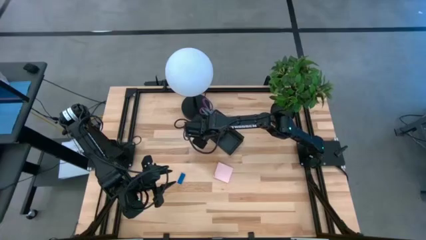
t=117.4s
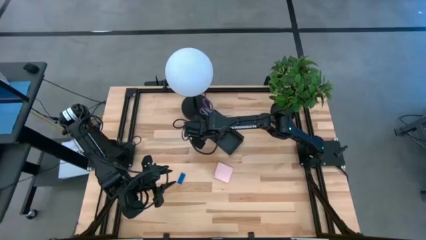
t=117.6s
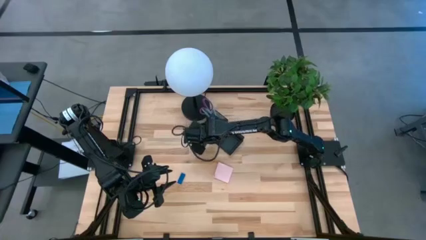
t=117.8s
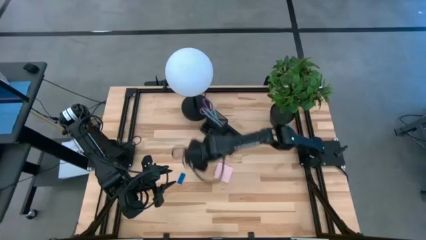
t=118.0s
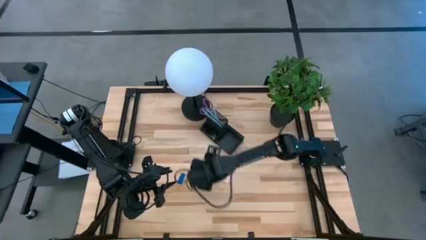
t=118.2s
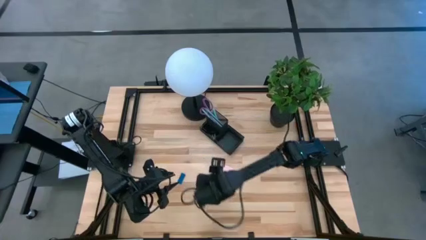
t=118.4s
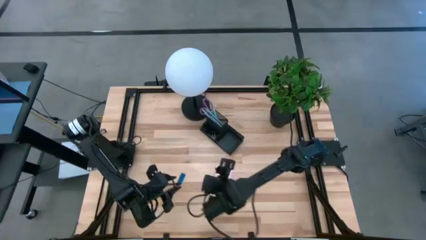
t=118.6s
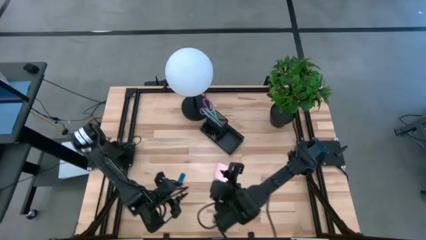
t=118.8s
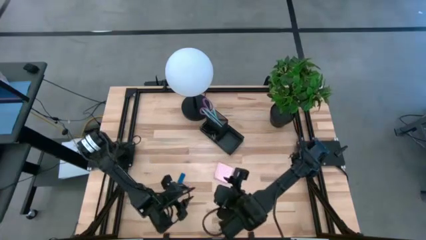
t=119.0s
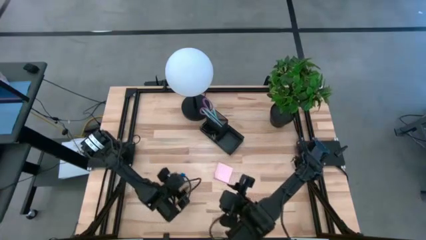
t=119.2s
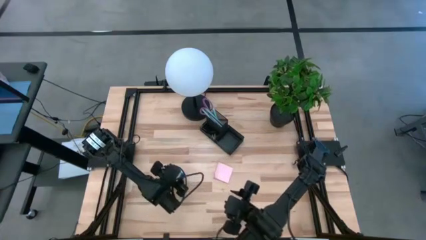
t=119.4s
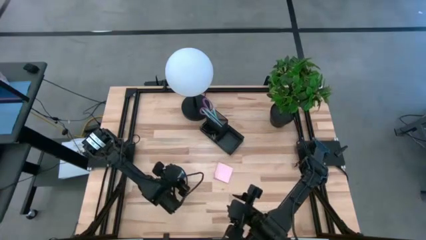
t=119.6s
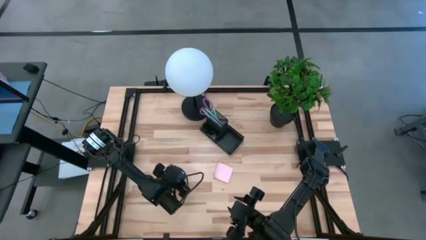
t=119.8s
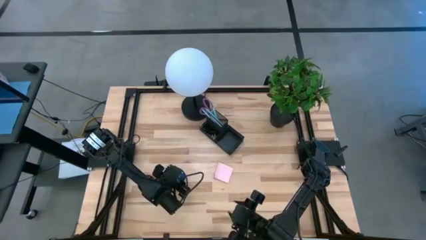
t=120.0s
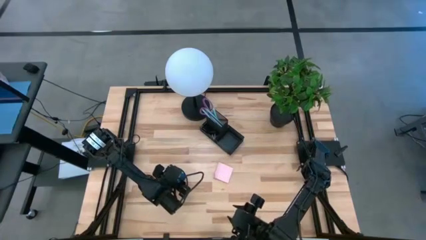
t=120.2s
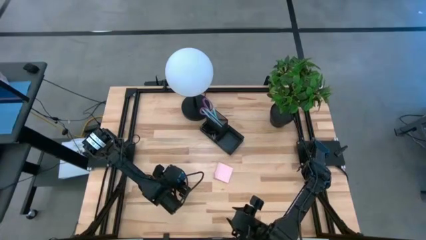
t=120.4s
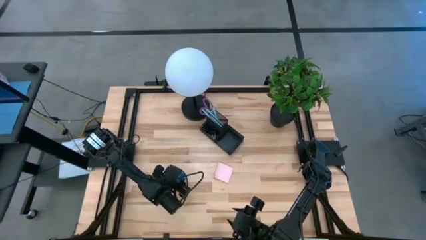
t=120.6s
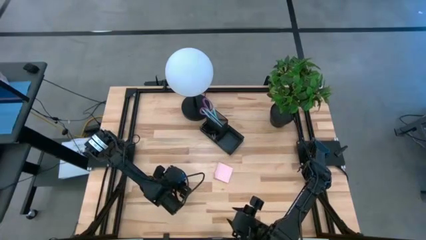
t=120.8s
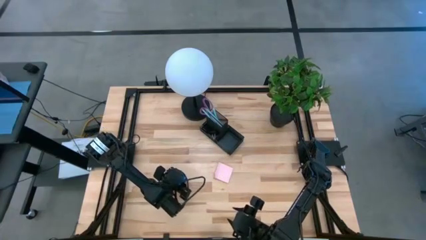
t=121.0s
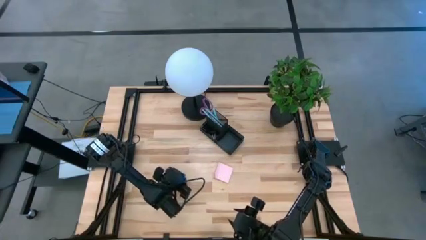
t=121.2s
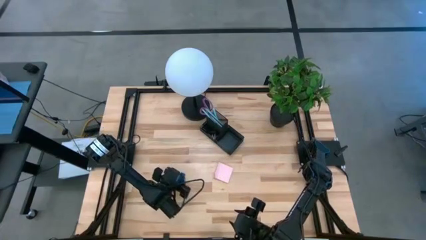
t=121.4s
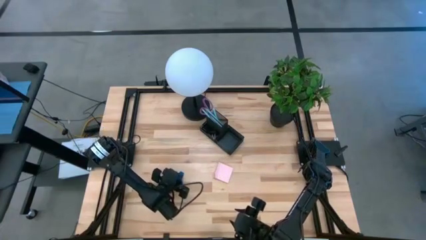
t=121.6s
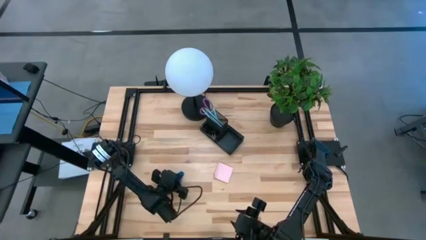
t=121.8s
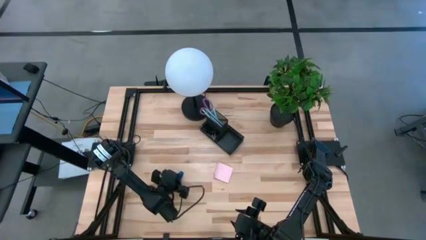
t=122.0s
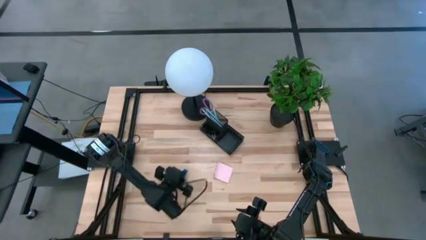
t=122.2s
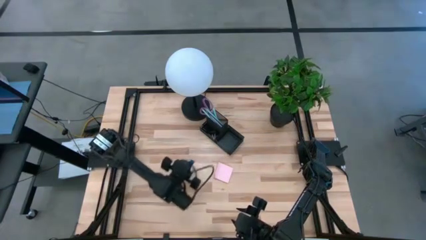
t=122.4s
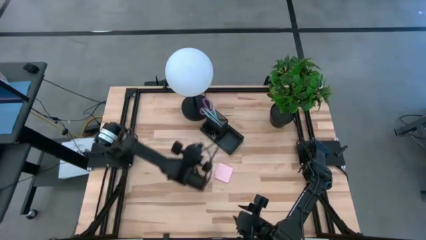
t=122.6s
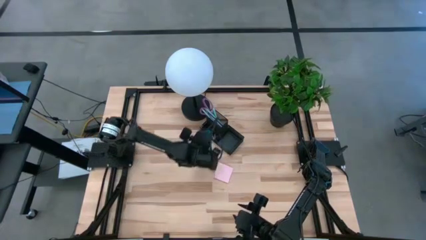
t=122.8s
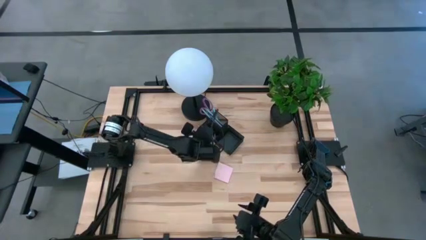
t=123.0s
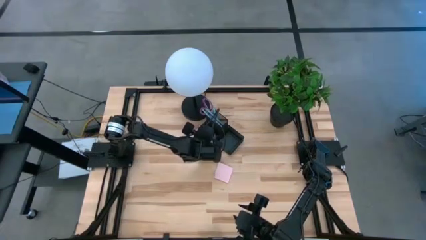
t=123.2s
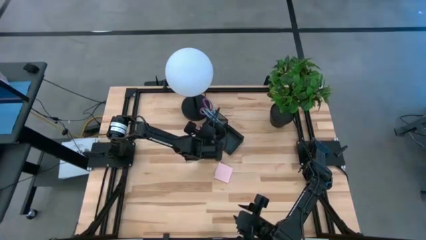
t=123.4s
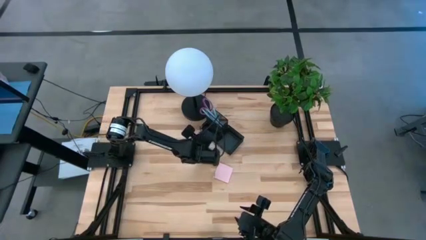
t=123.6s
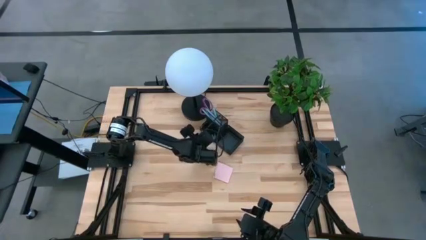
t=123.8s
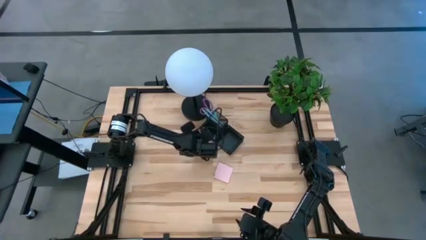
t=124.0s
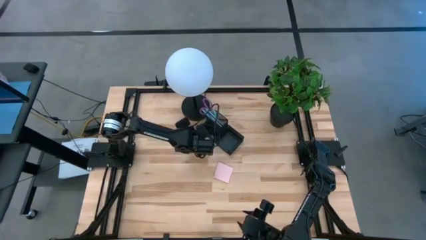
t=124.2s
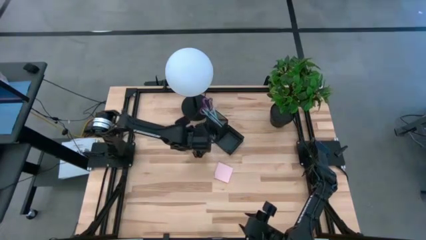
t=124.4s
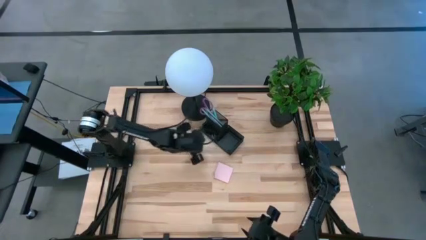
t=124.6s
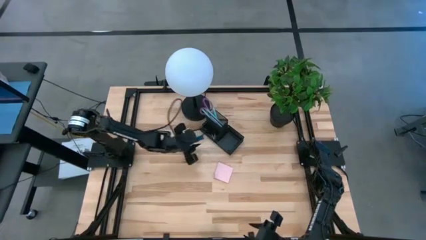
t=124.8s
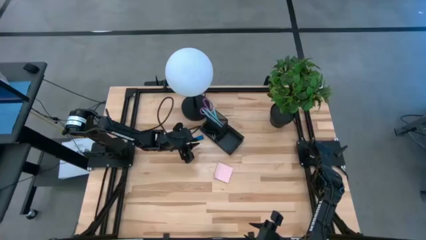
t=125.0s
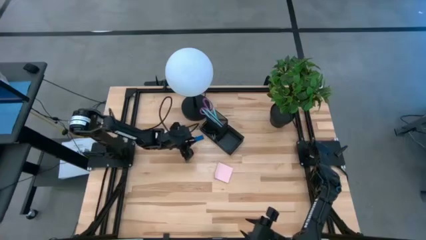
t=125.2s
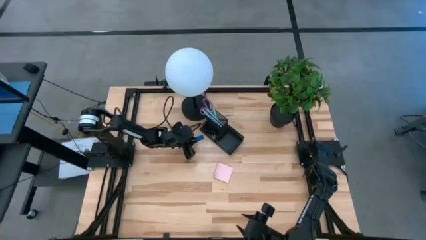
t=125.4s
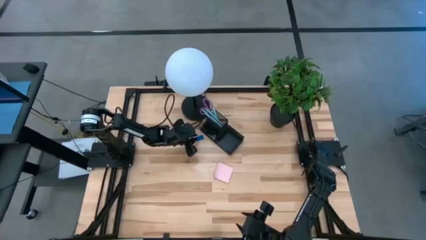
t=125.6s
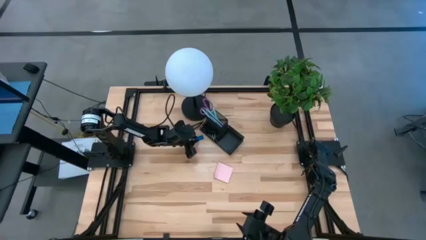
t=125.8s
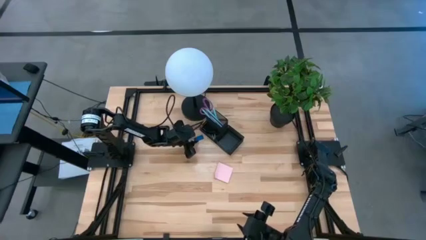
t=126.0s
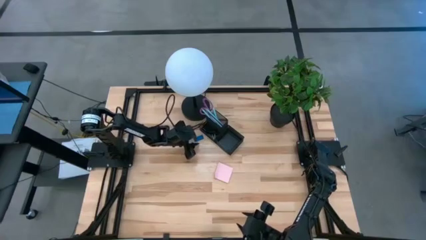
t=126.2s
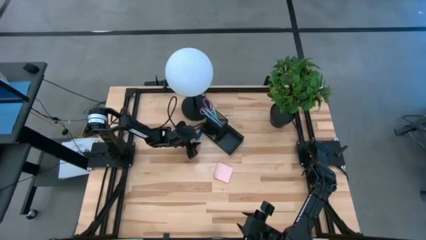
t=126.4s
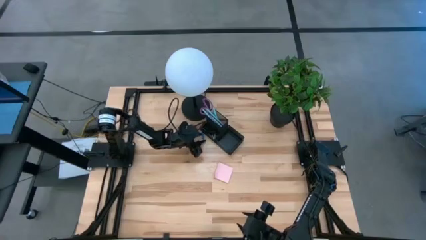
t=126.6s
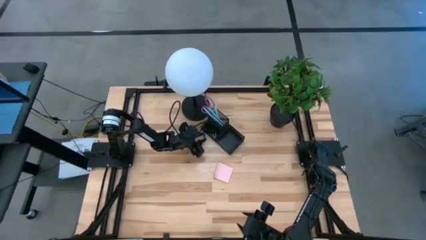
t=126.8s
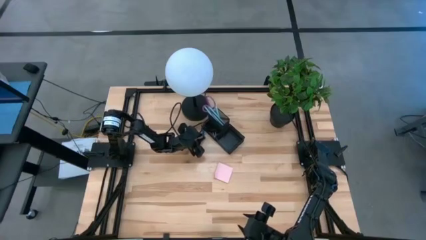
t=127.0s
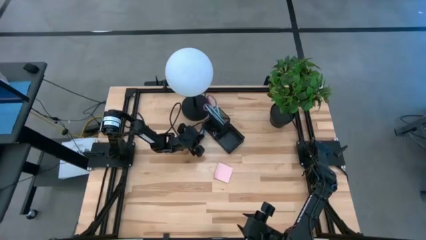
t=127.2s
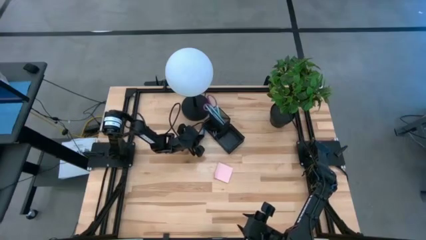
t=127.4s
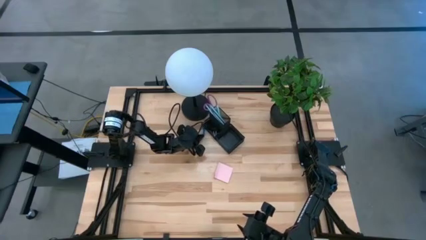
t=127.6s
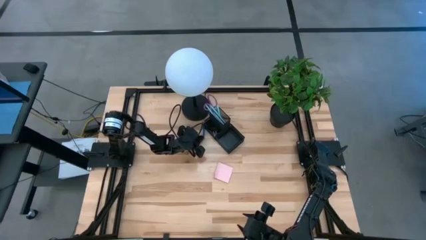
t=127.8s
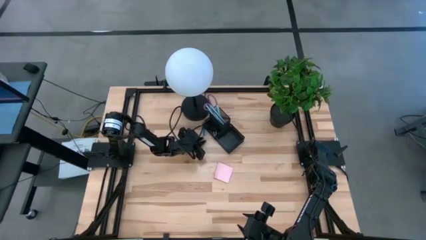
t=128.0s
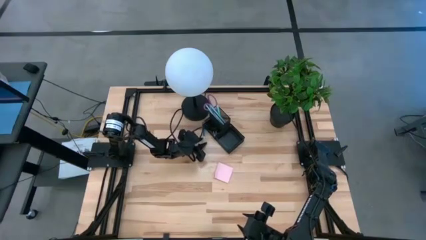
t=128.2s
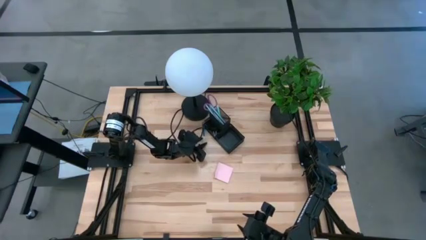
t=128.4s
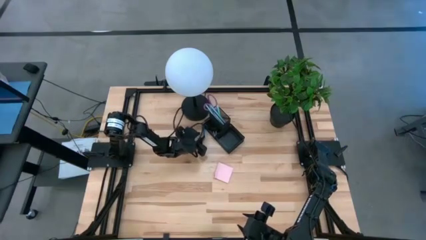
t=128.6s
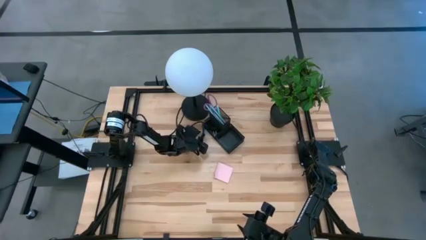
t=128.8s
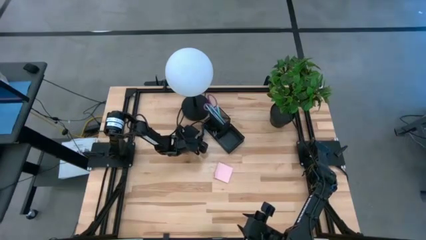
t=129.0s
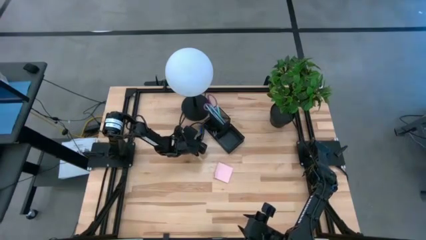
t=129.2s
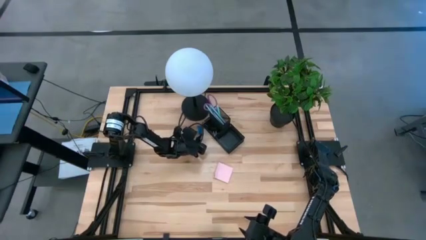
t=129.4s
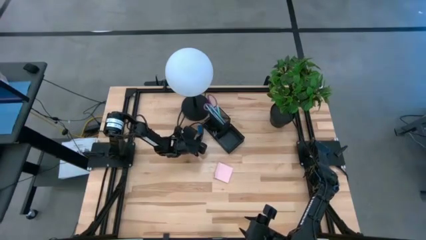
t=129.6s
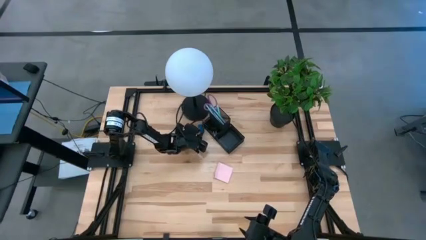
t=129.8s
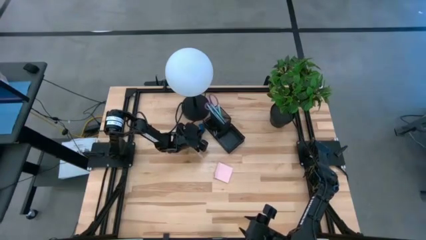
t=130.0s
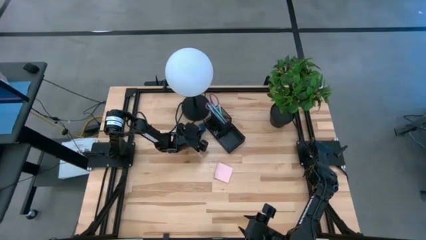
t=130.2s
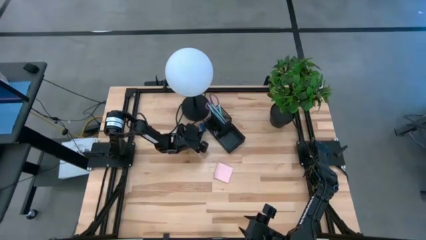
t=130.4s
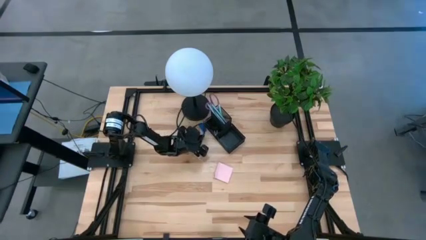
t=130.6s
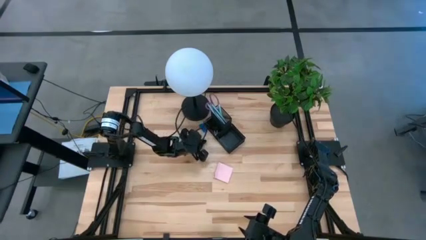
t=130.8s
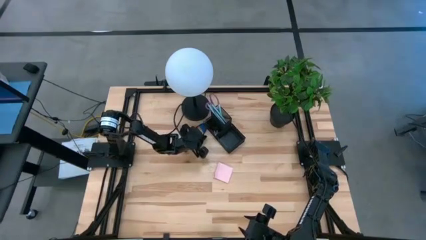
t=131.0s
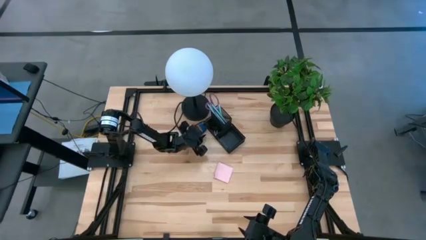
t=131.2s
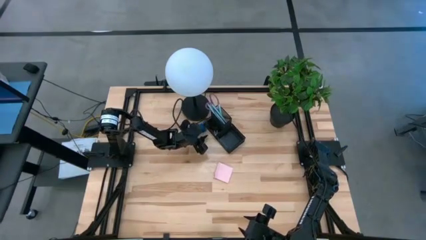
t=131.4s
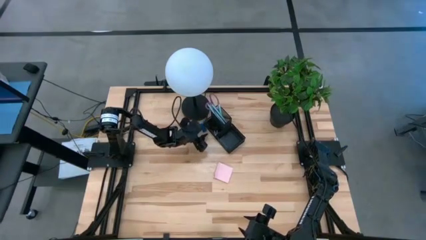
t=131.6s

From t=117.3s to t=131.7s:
Task: Pick and place office supplies into organizer
Put the blue eraser into the desk organizer
